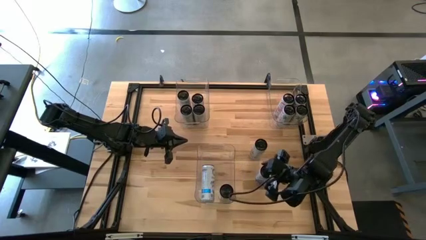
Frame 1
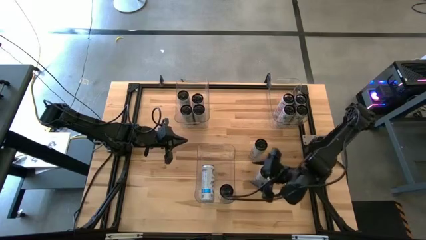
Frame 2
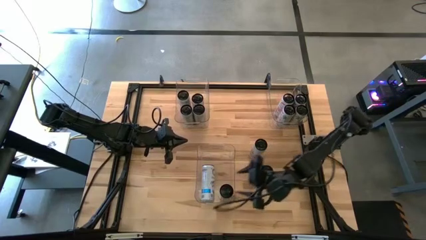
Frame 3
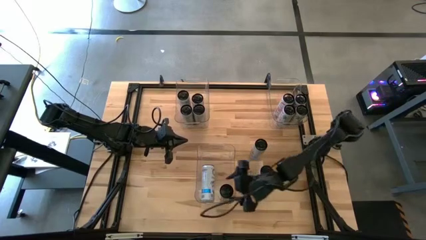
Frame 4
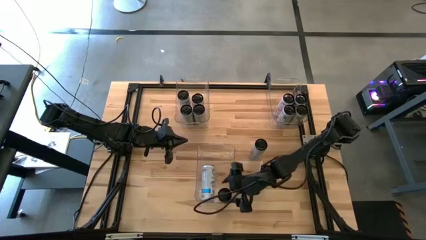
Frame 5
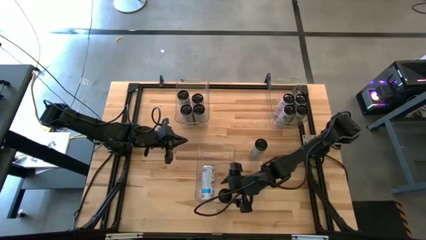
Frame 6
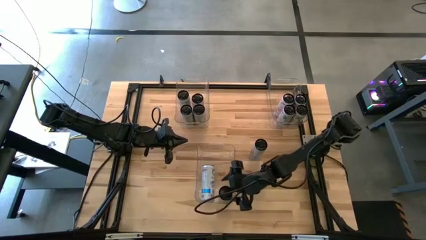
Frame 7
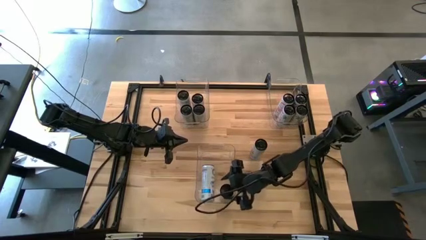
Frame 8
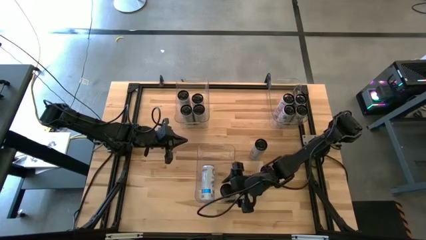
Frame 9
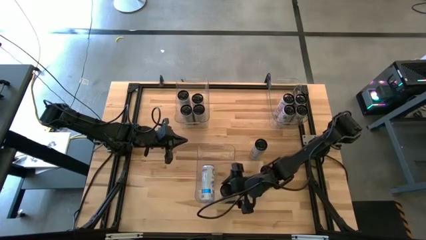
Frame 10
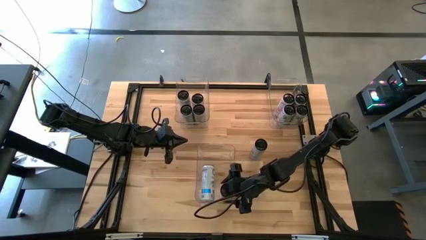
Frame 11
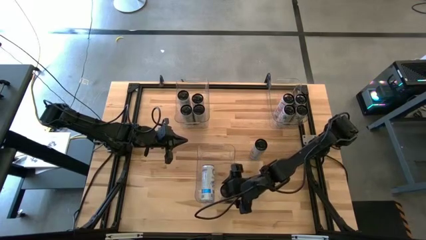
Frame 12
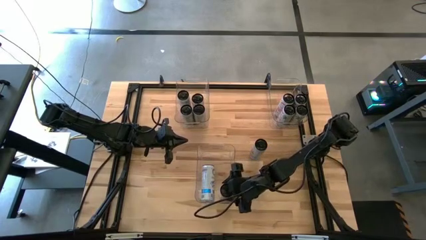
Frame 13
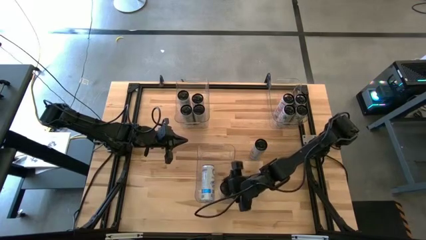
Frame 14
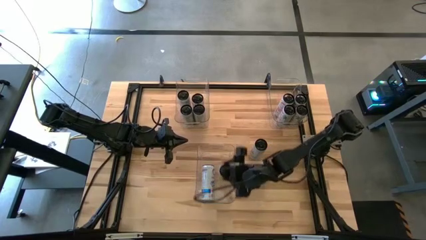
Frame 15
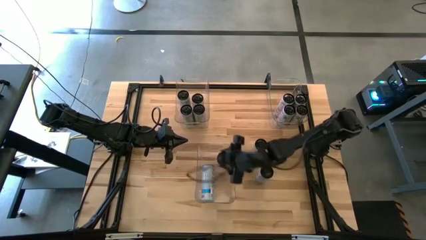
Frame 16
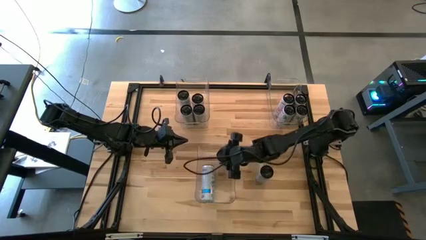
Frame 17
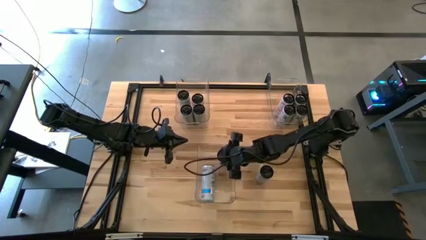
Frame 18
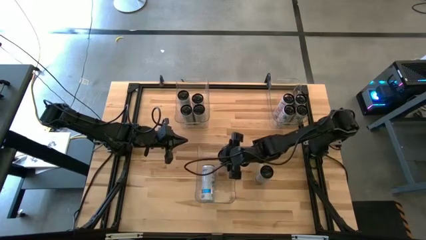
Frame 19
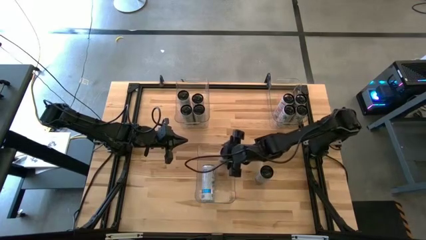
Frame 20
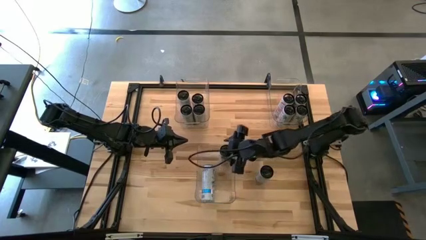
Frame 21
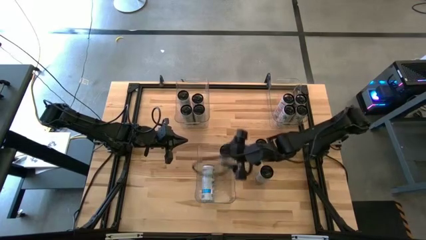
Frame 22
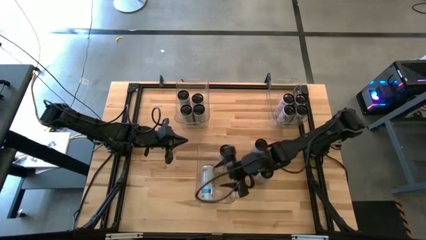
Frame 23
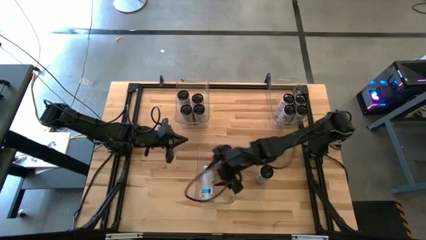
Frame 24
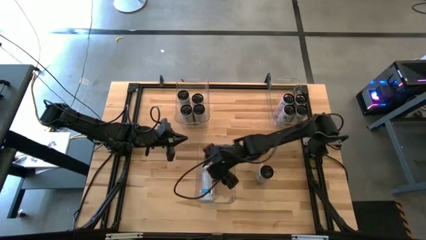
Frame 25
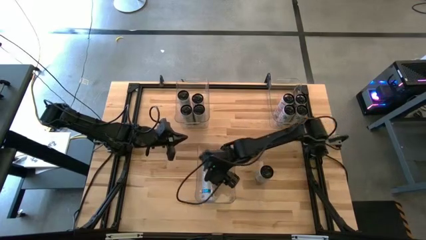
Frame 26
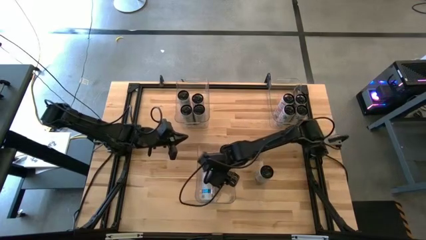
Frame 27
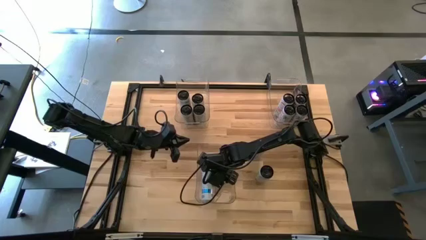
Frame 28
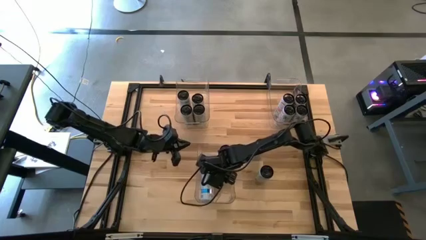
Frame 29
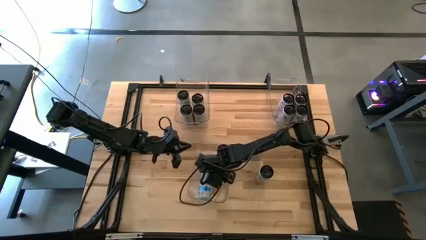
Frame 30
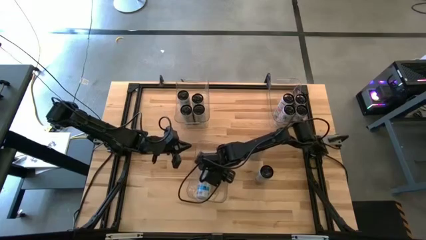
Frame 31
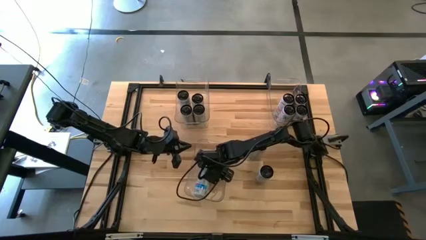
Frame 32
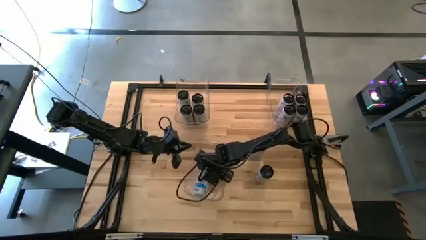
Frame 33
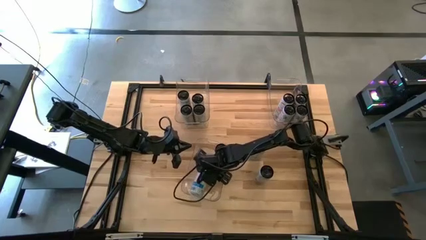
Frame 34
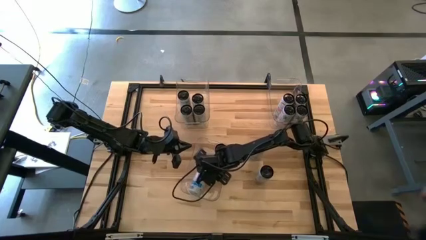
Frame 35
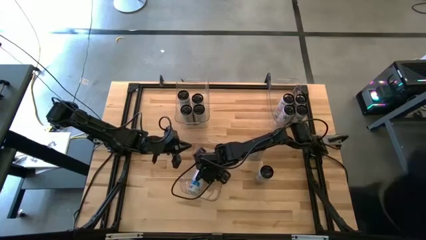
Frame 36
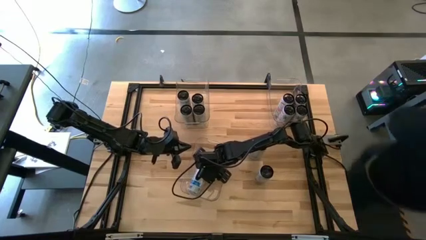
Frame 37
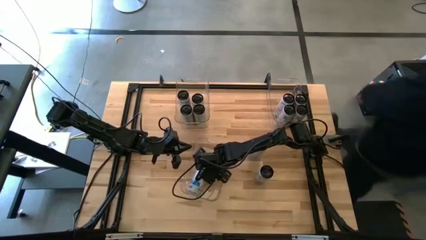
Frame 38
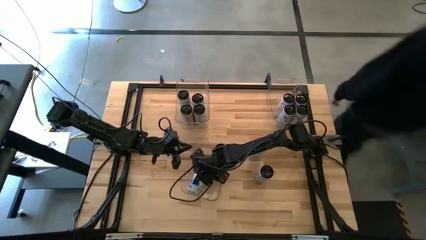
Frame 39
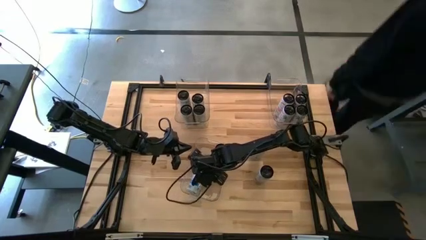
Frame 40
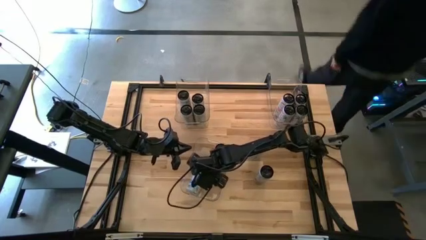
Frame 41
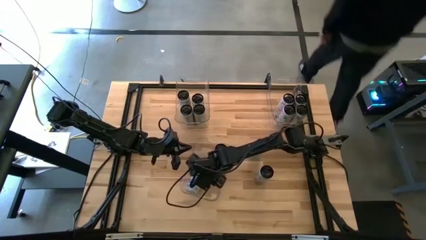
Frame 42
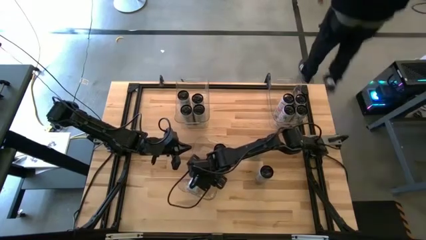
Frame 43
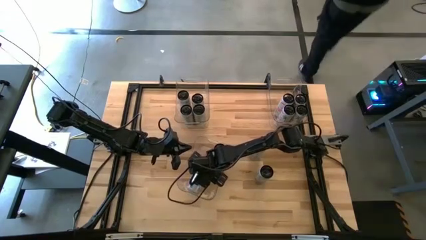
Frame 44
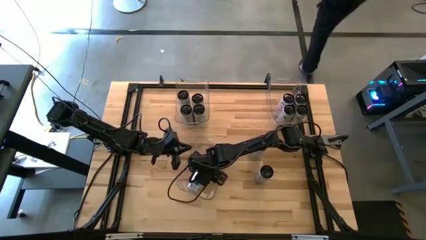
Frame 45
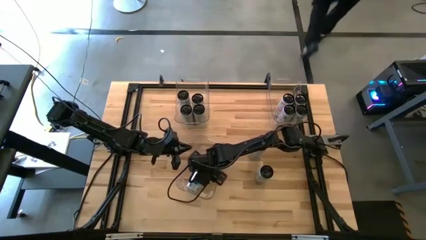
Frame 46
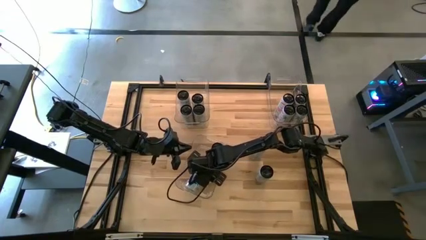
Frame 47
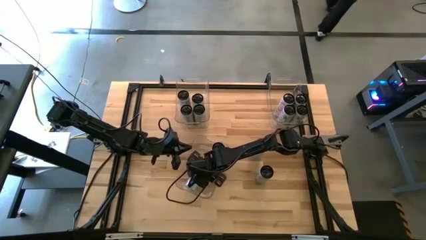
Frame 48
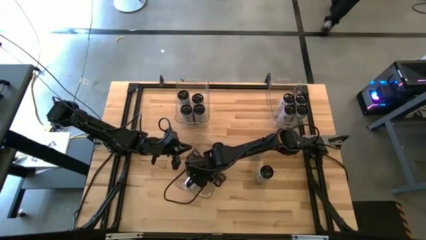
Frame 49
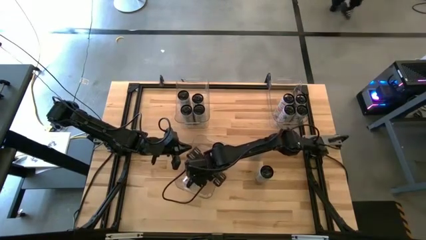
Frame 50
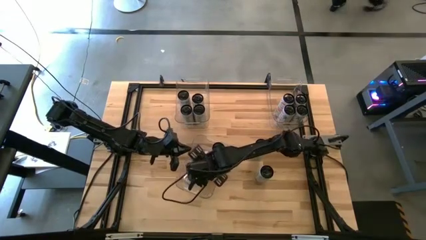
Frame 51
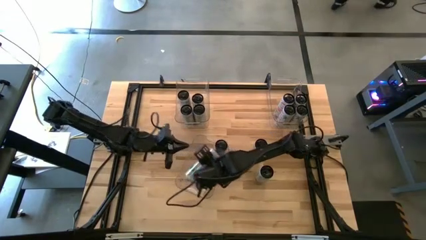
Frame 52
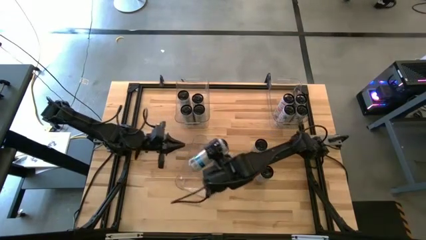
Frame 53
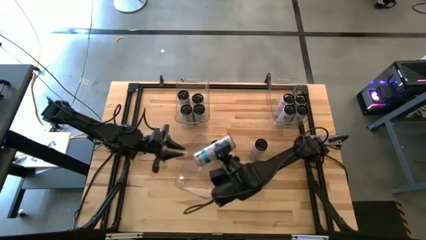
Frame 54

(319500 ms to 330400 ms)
Task: Sort soda cans
Adjust the white/blue soda cans
